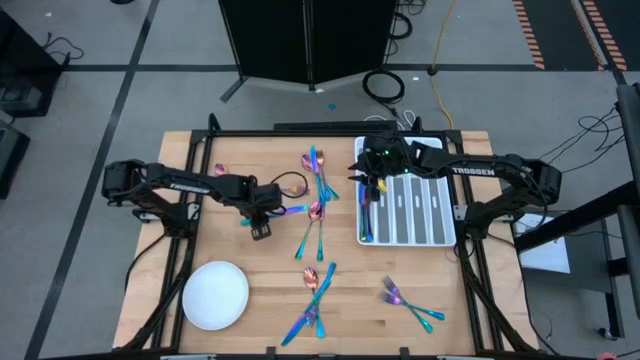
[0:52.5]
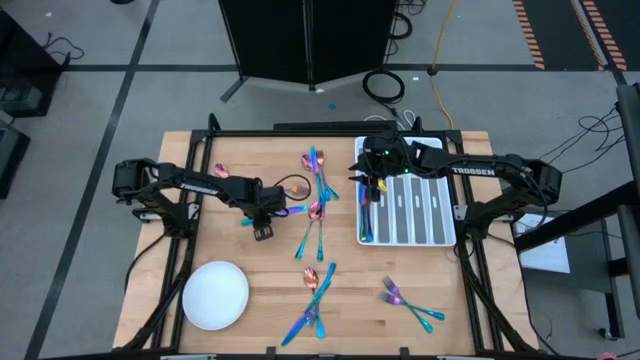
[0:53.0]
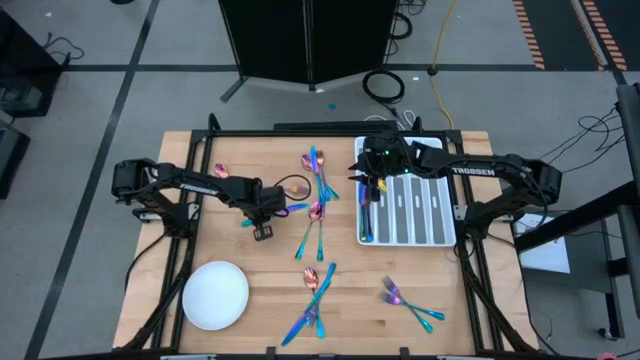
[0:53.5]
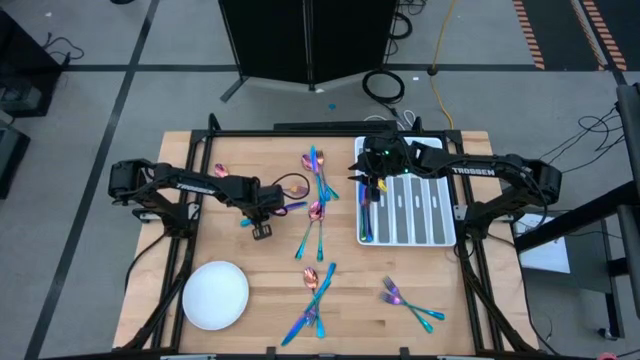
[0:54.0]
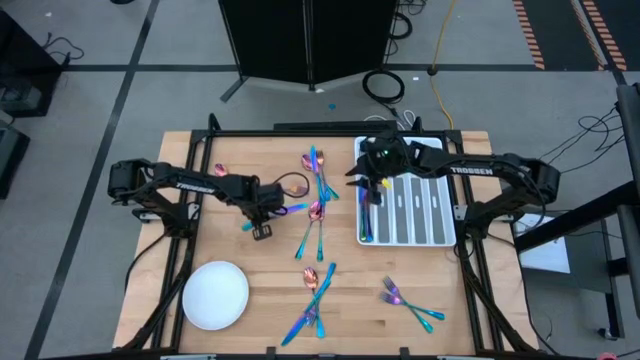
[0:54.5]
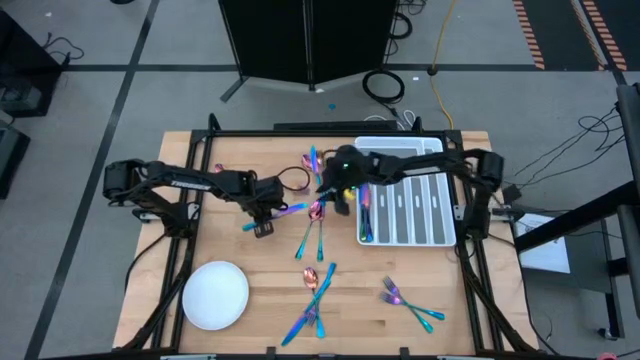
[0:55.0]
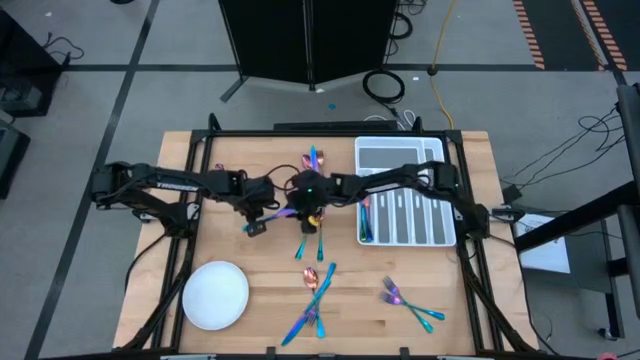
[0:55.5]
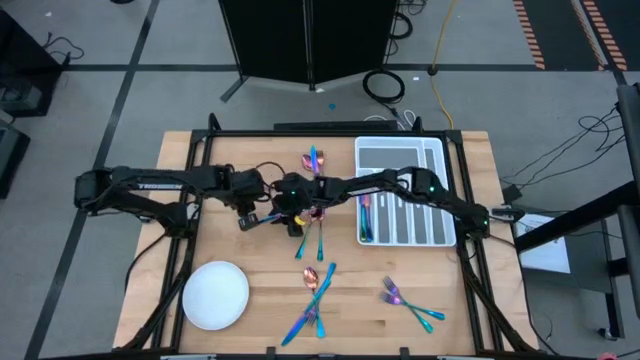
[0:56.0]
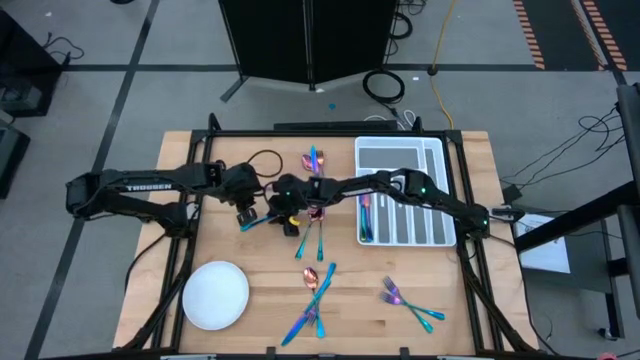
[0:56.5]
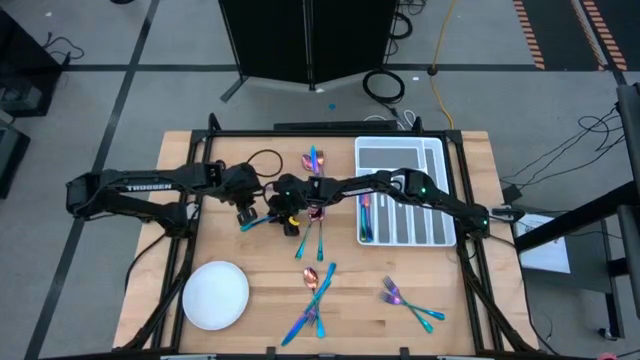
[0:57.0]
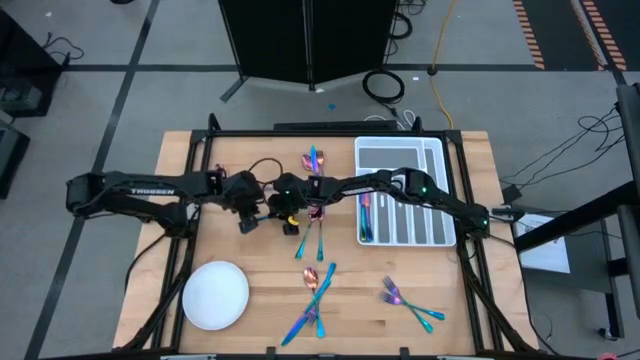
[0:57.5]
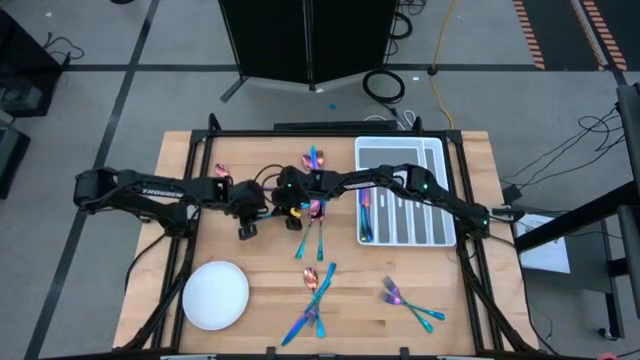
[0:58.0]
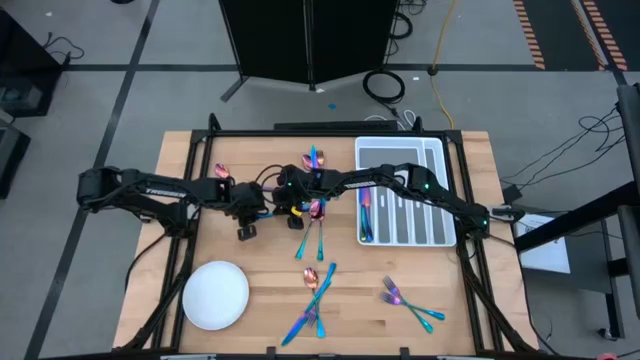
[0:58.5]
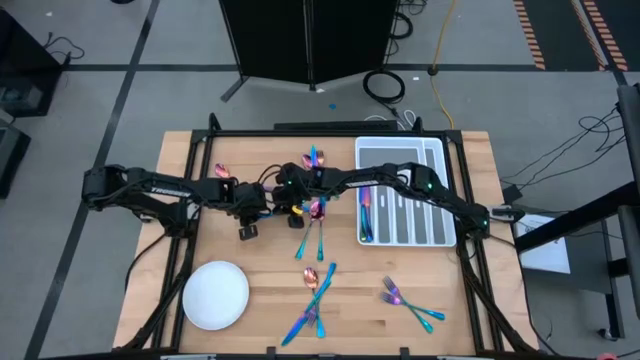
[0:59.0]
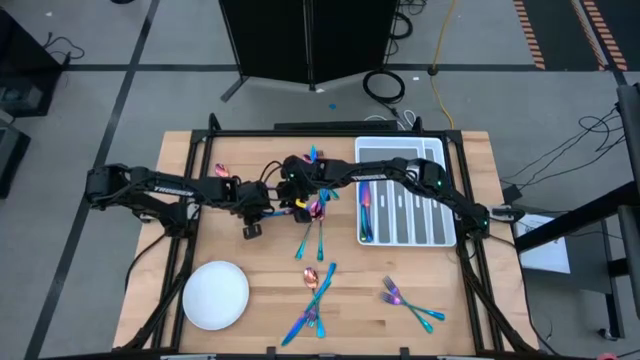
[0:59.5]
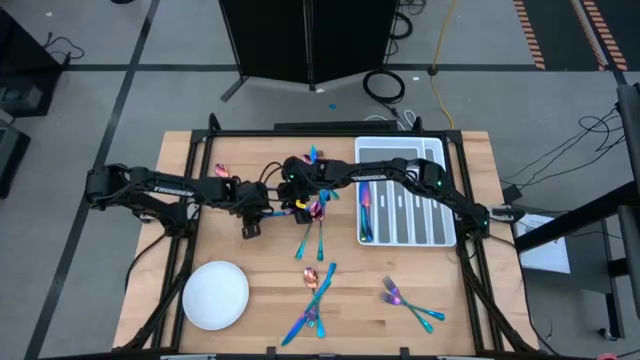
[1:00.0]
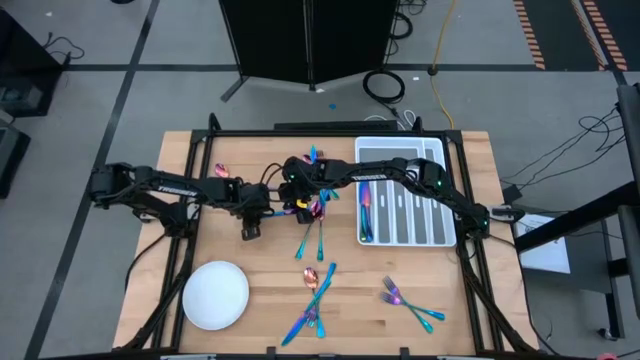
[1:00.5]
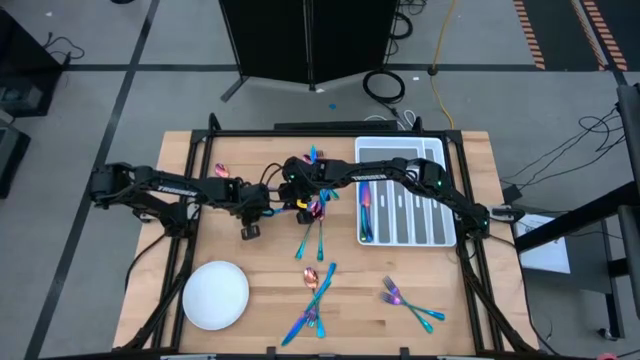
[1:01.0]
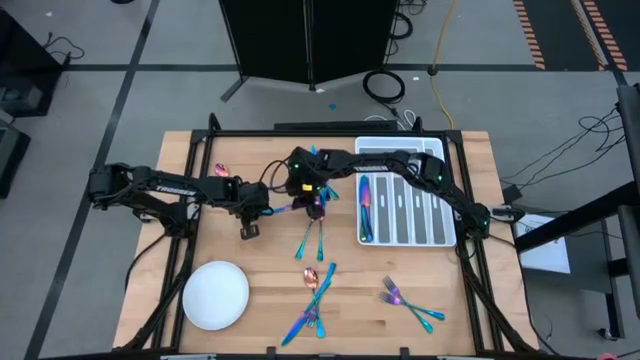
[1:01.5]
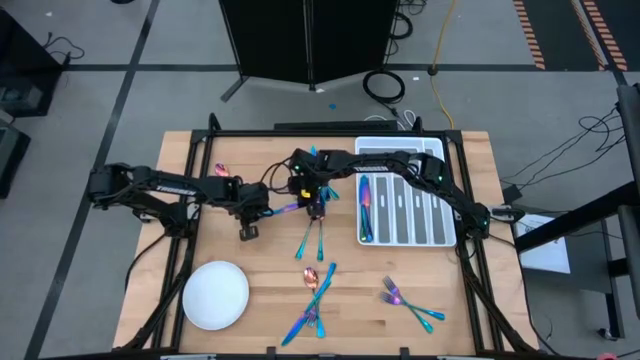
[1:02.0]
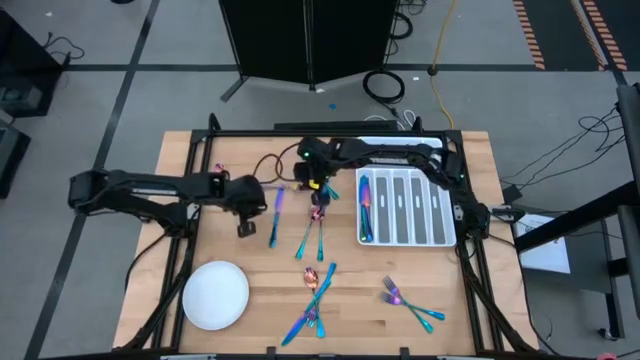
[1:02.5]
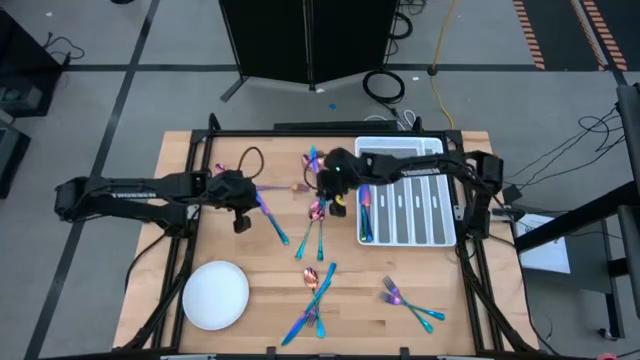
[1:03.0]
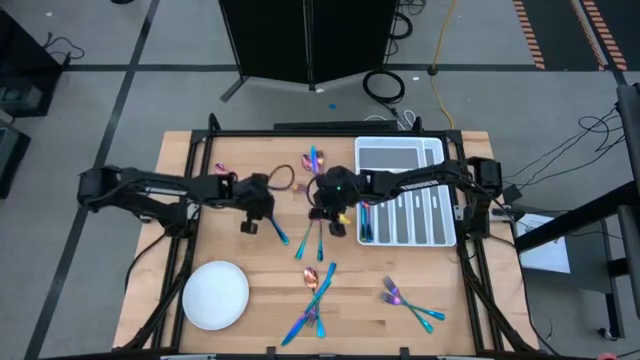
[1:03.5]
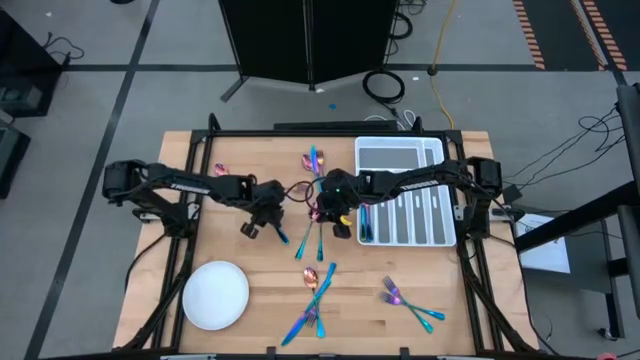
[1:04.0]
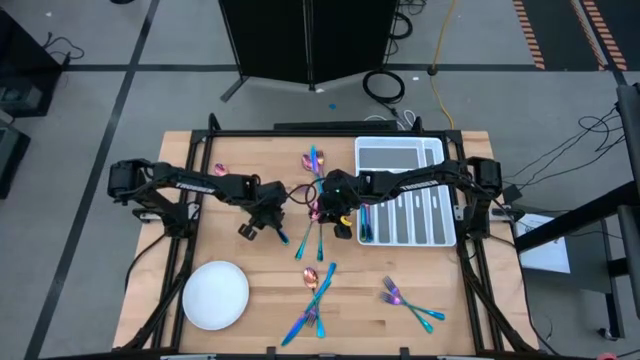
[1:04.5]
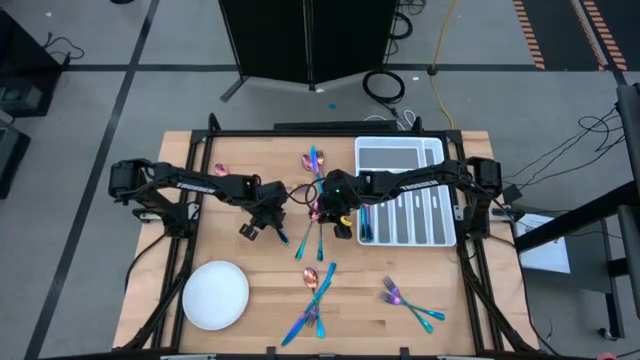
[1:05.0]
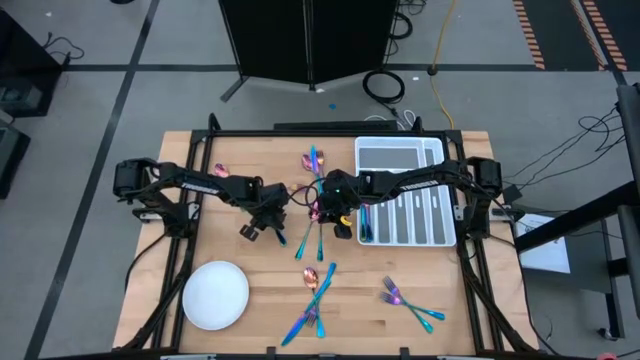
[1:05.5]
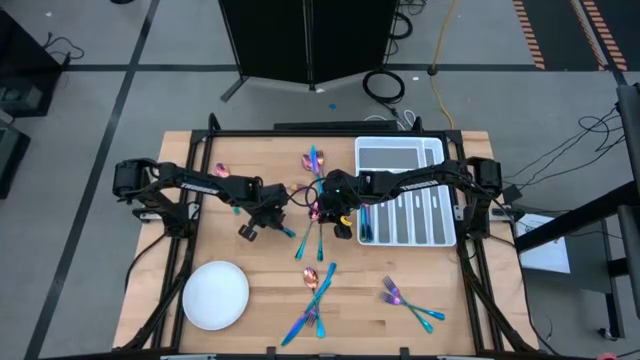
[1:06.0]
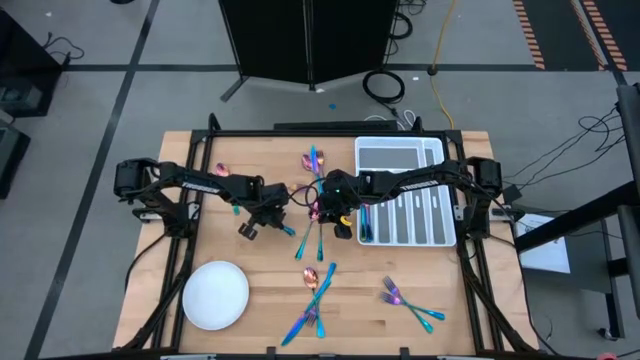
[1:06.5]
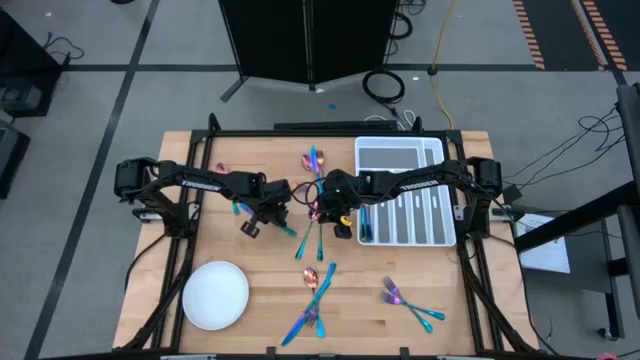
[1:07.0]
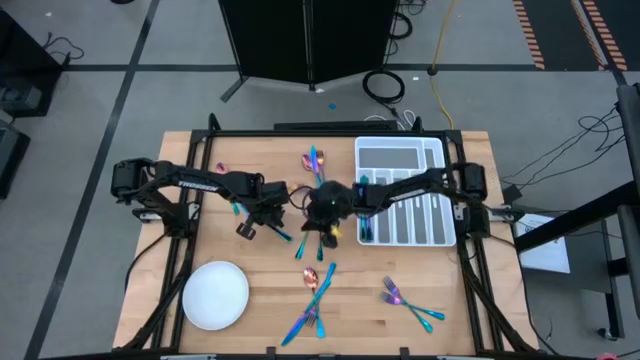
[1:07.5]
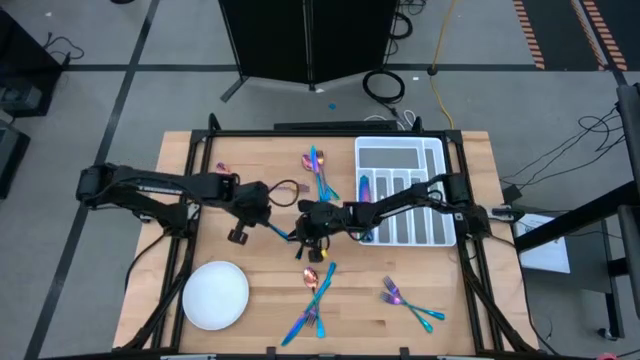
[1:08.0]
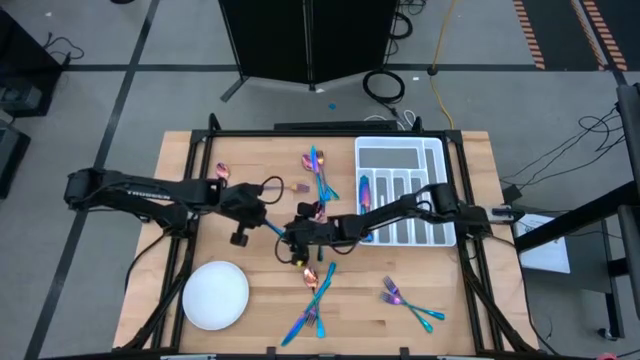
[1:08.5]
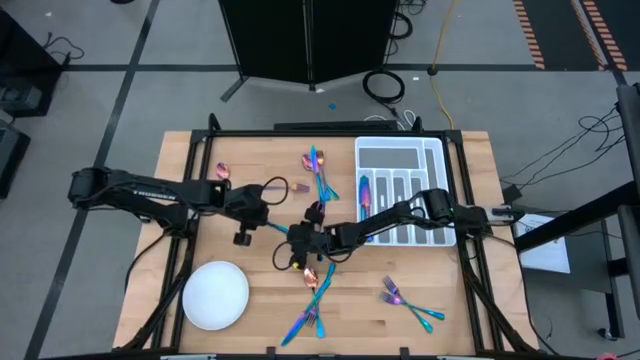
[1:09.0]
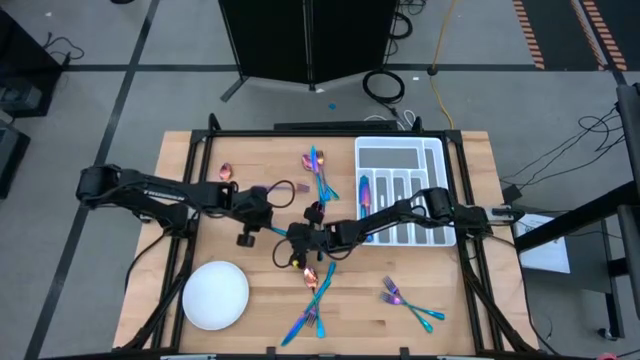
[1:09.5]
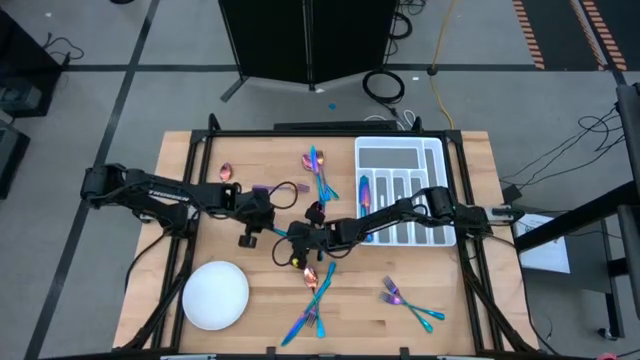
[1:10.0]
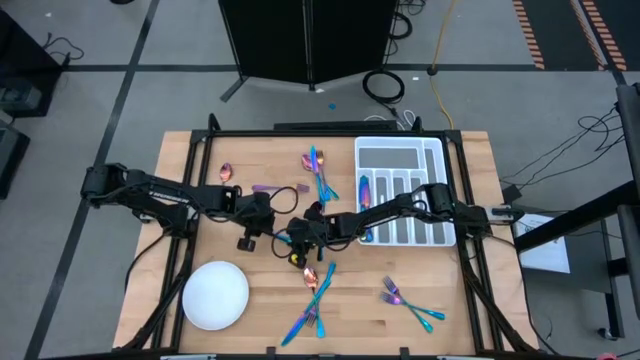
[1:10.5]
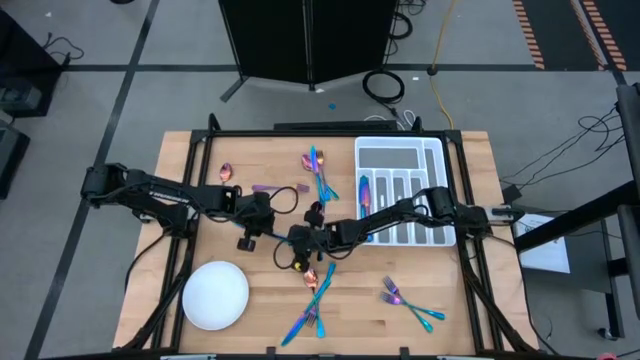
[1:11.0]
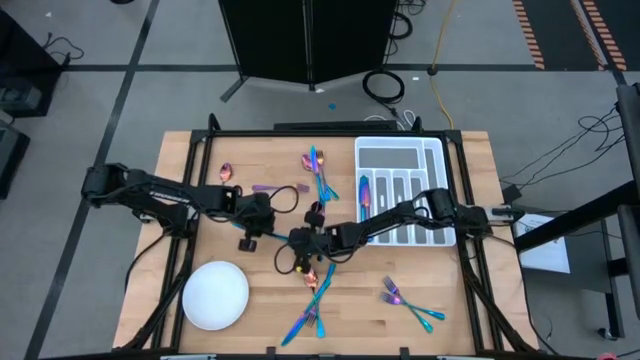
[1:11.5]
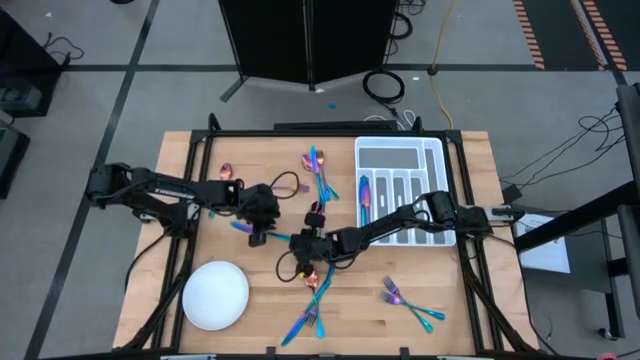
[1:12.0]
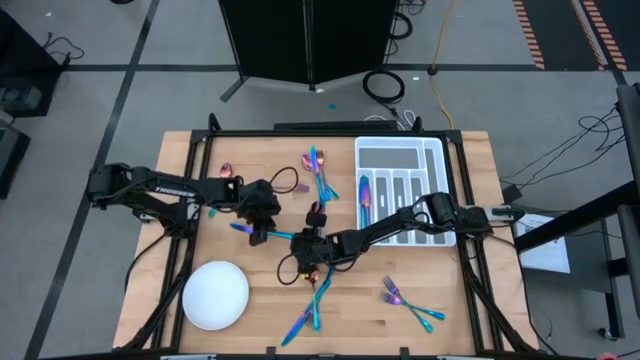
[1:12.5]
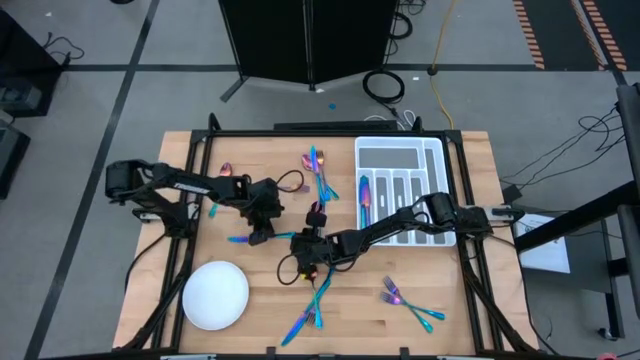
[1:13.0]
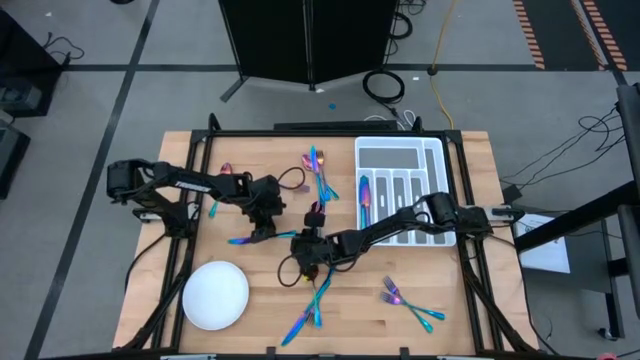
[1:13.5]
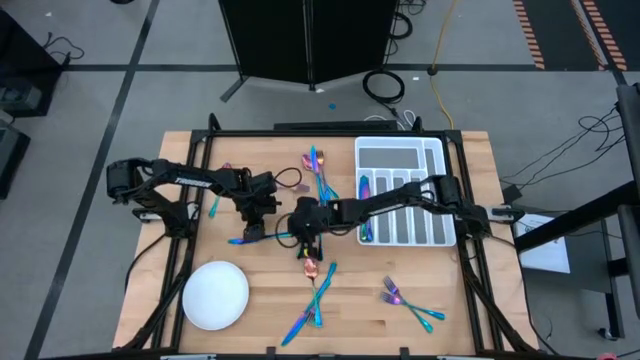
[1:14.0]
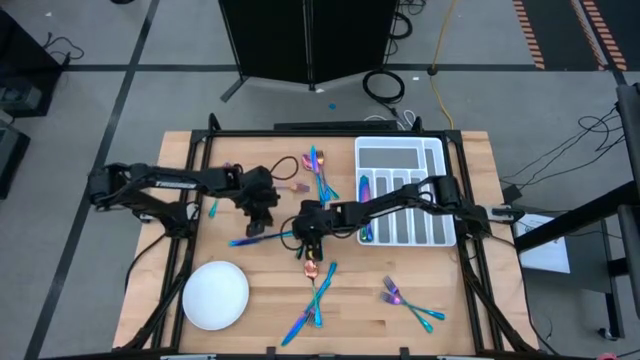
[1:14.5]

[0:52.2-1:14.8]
Task: Sort silverware
Put the blue knife into the utensil organizer
